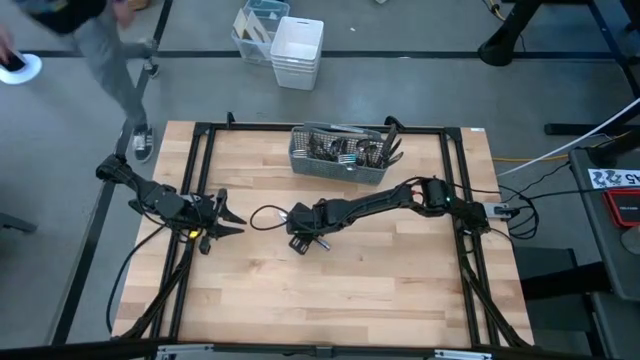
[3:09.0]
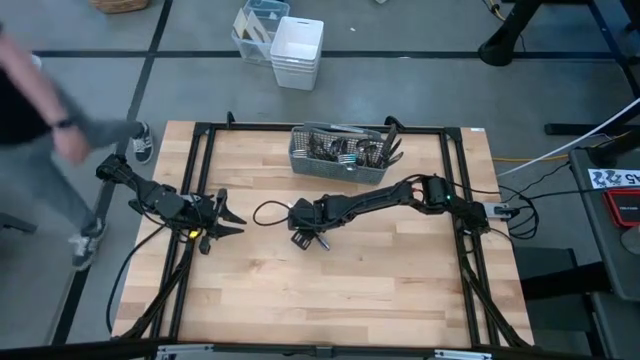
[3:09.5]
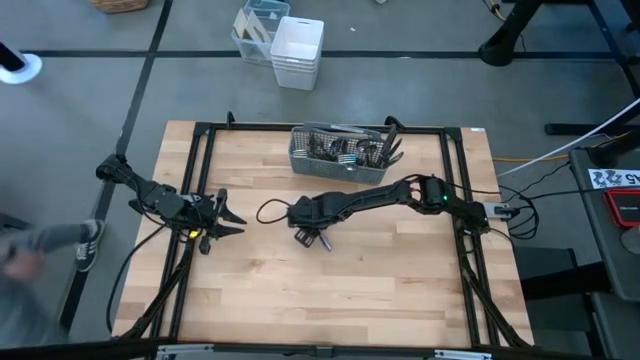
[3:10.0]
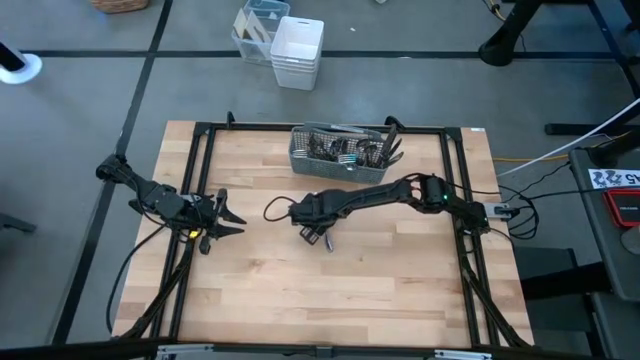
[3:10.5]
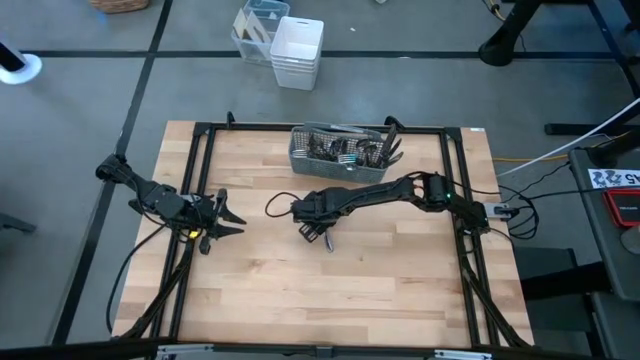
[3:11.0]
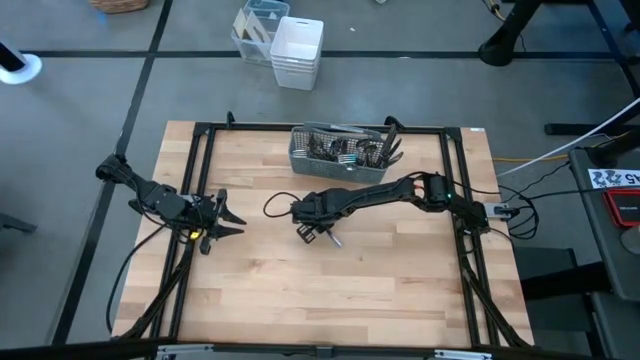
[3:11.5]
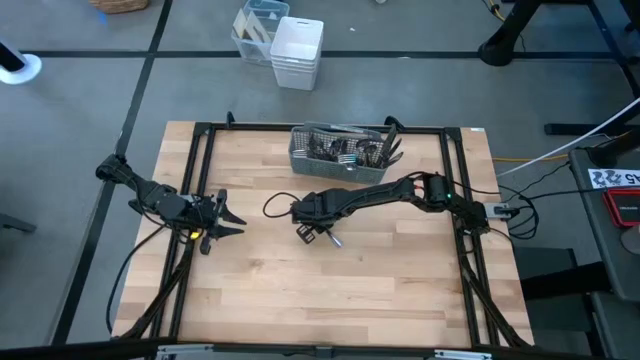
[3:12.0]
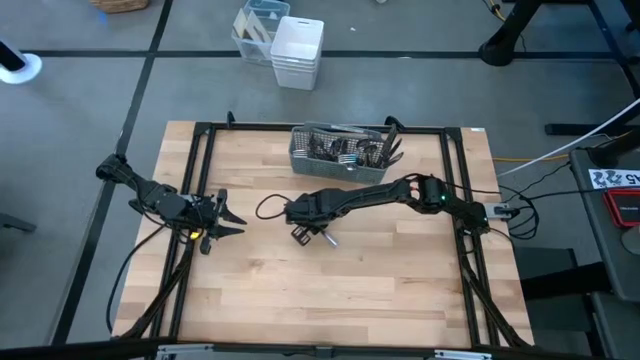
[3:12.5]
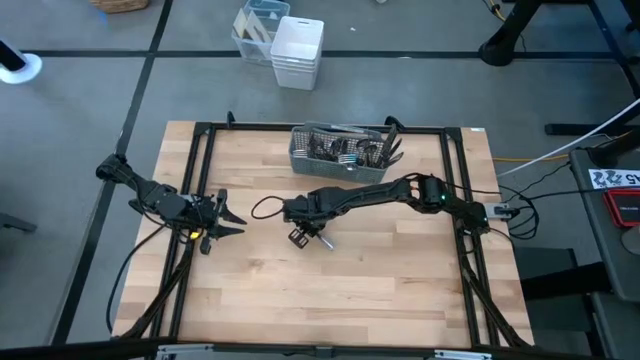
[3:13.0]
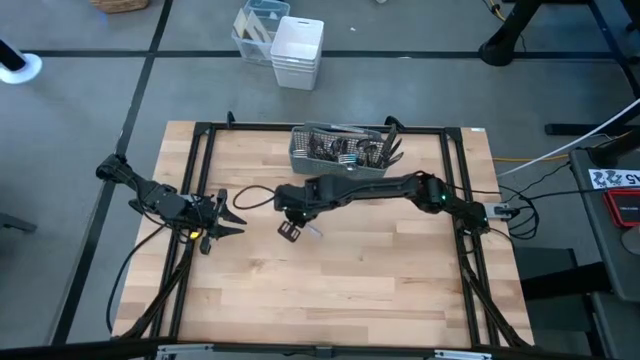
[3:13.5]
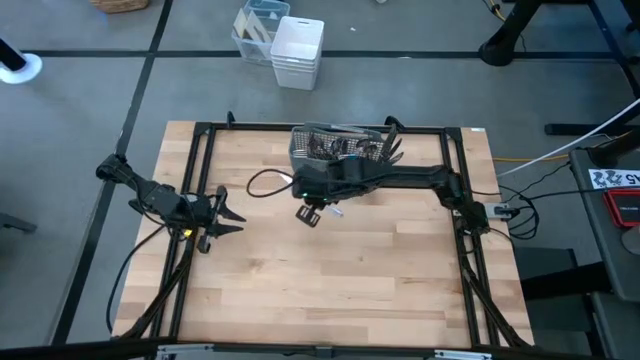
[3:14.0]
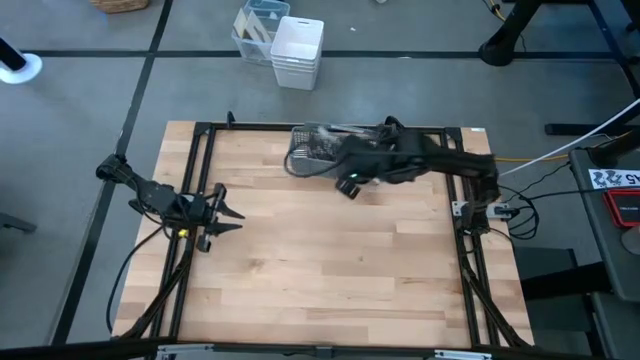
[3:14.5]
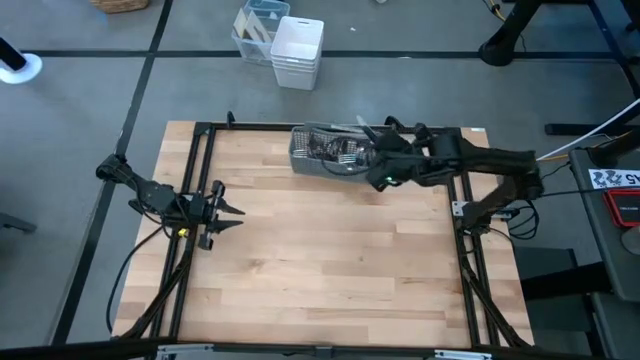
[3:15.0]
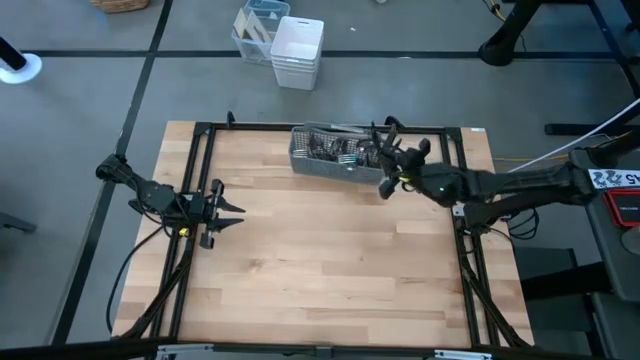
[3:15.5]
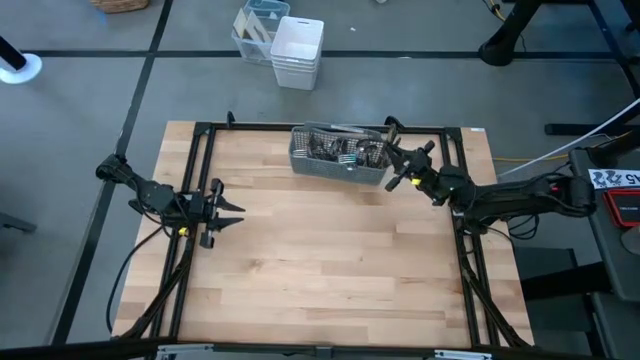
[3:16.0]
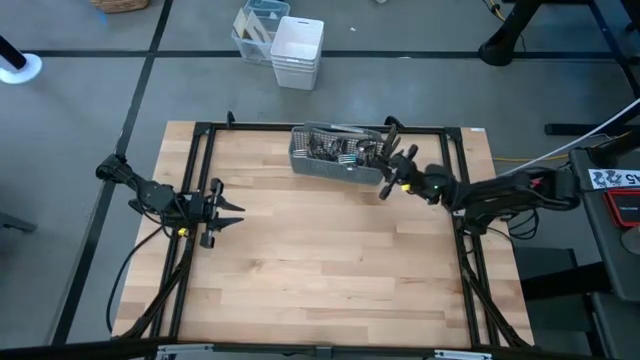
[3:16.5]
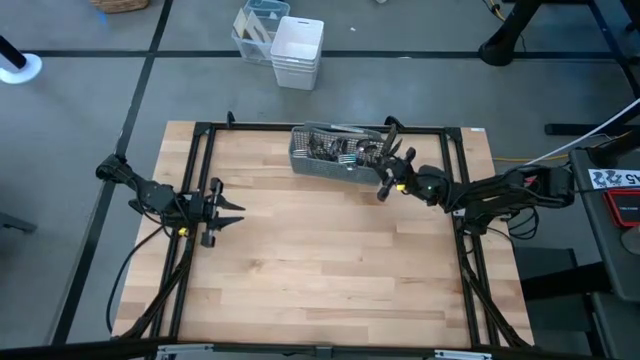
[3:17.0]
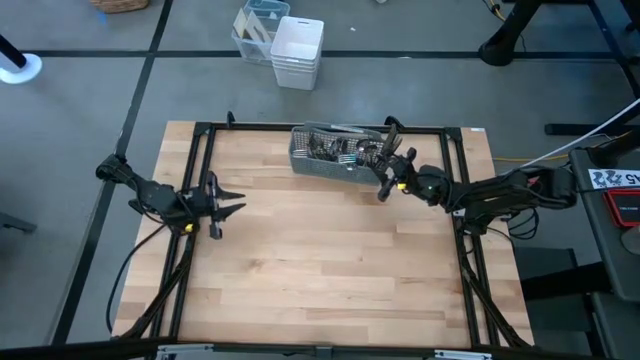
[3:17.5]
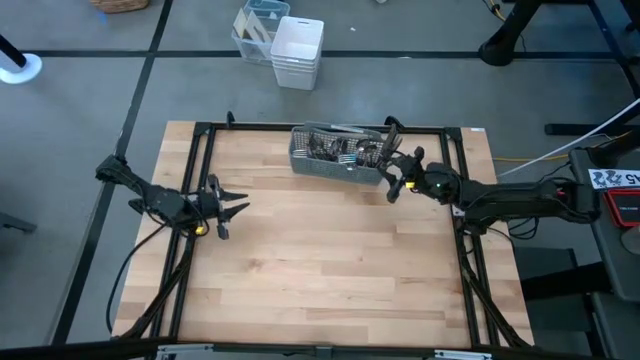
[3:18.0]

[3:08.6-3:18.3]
Task: Sort silverware
Put the knife into the silverware rack

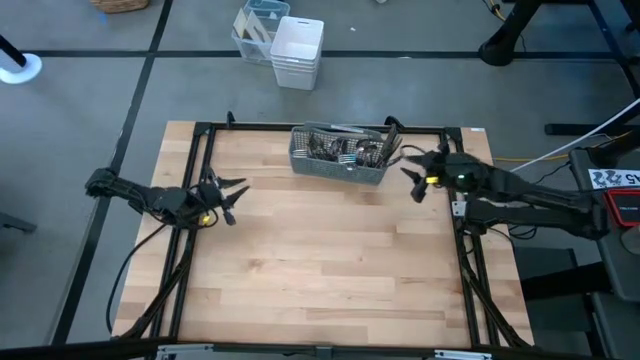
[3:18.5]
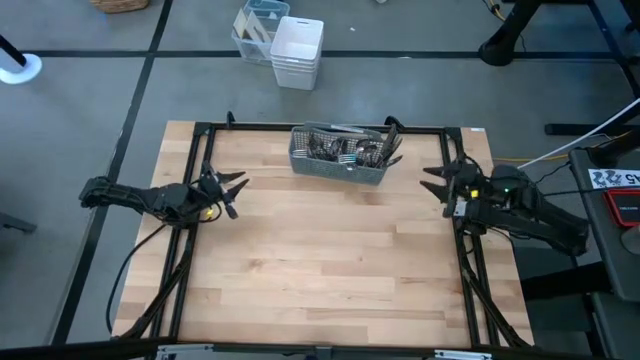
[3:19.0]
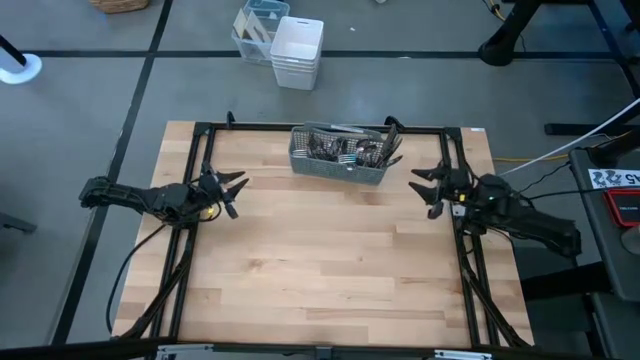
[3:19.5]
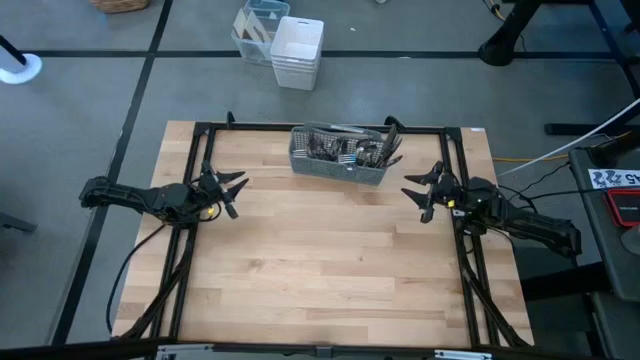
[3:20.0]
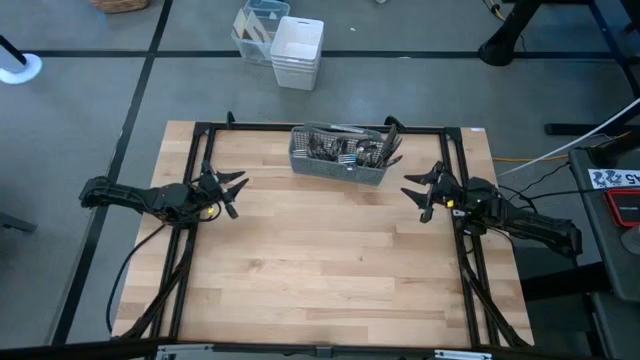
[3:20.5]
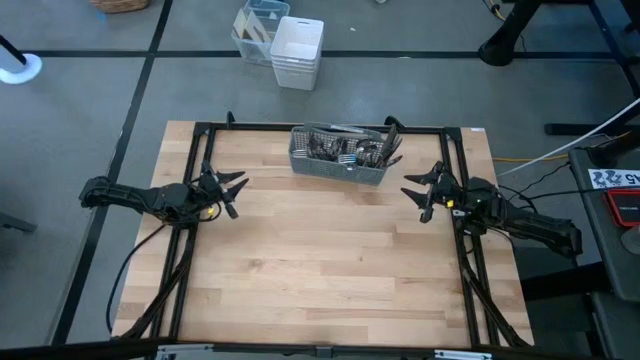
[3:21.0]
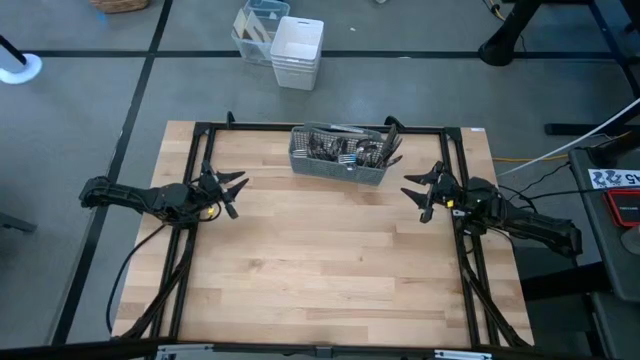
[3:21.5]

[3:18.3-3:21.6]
Return to Home Position

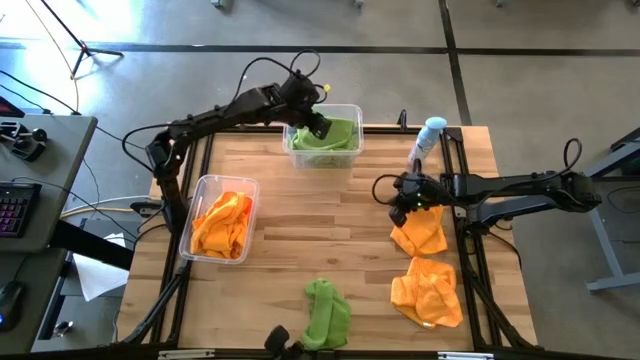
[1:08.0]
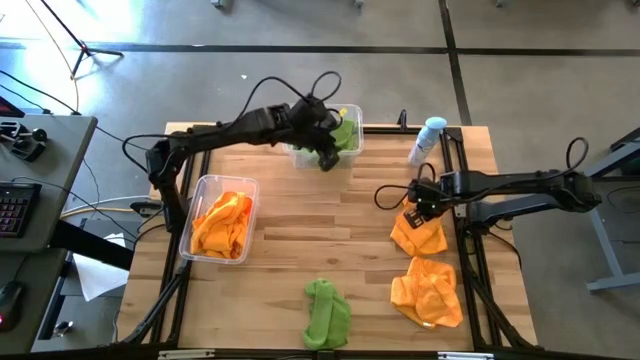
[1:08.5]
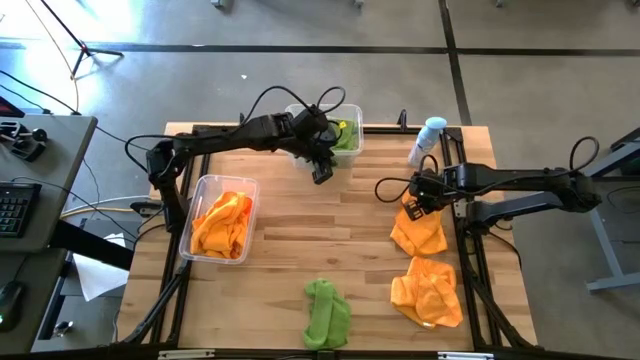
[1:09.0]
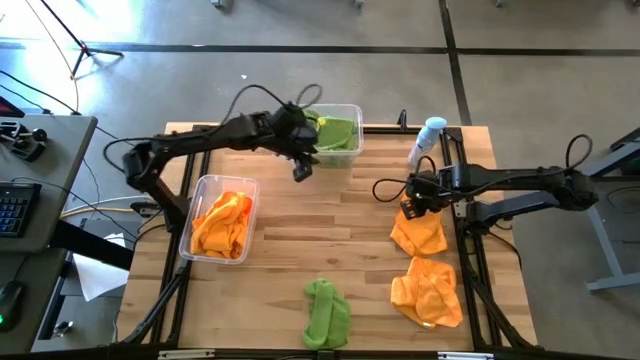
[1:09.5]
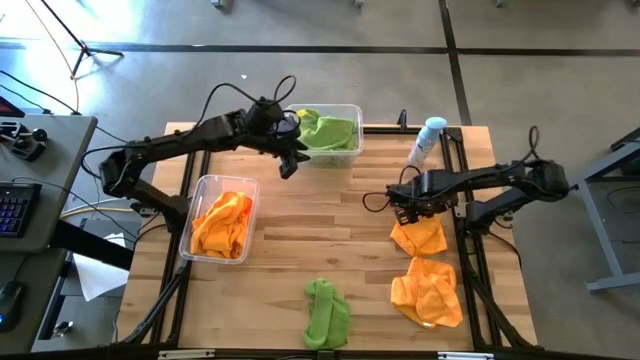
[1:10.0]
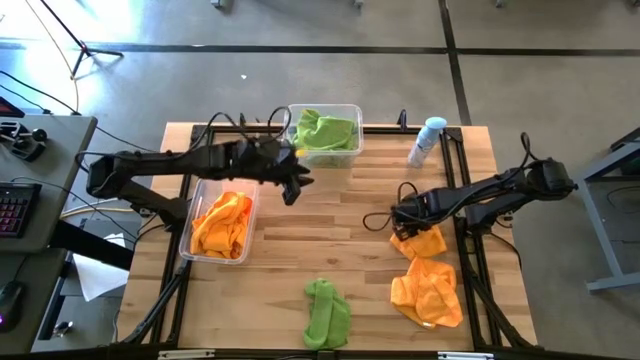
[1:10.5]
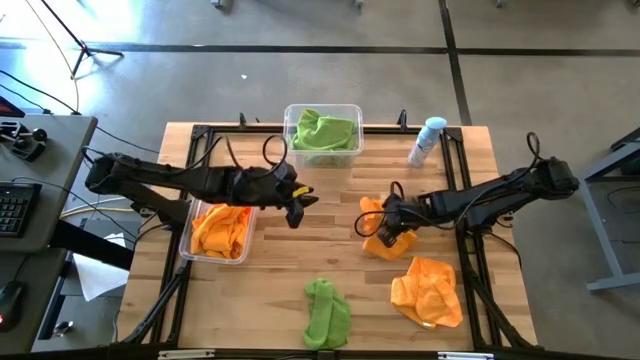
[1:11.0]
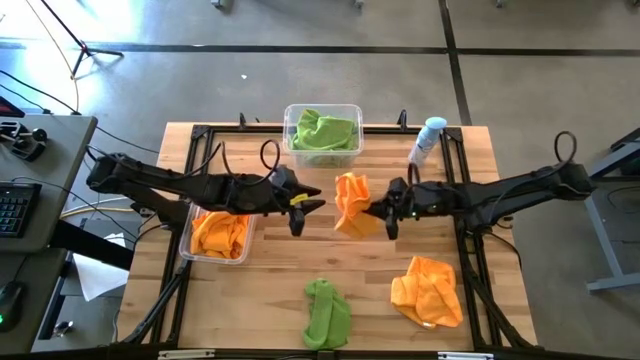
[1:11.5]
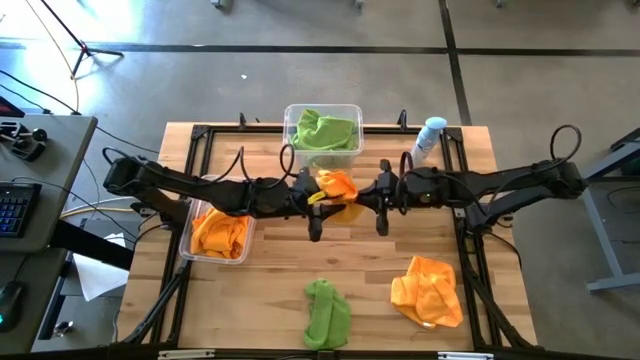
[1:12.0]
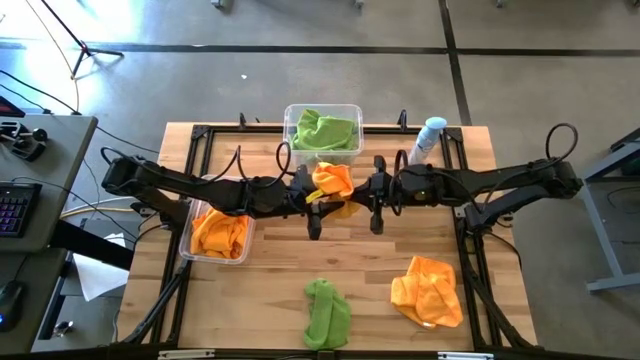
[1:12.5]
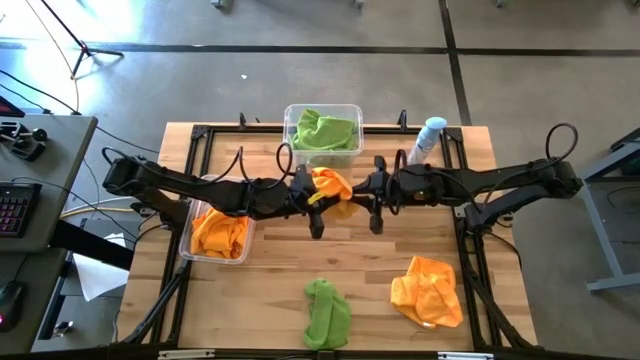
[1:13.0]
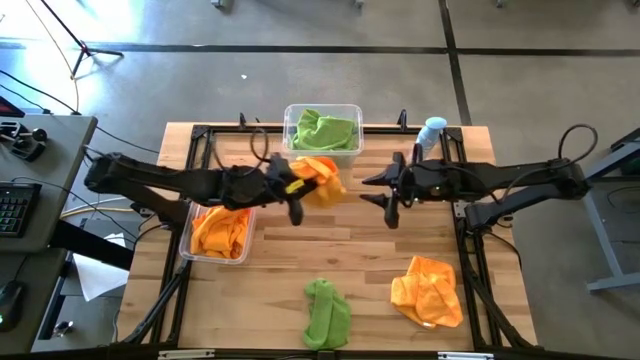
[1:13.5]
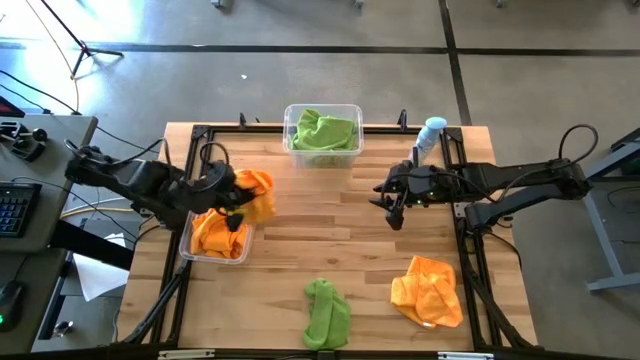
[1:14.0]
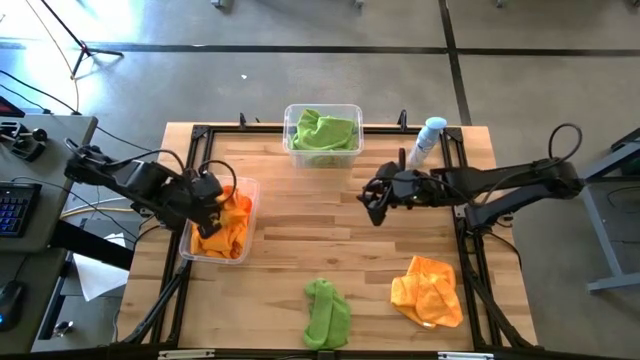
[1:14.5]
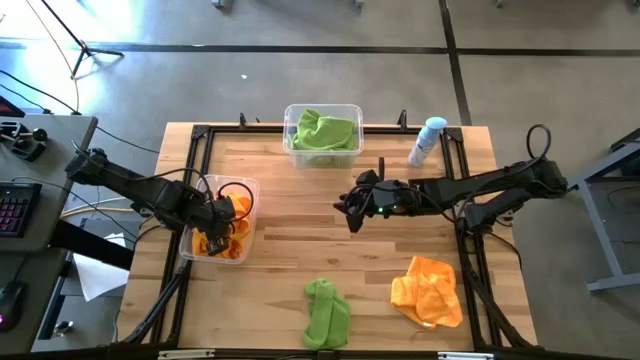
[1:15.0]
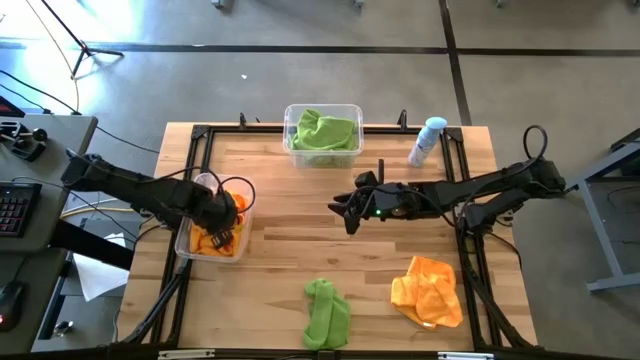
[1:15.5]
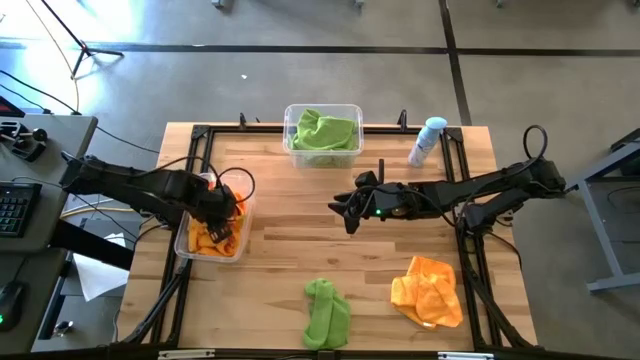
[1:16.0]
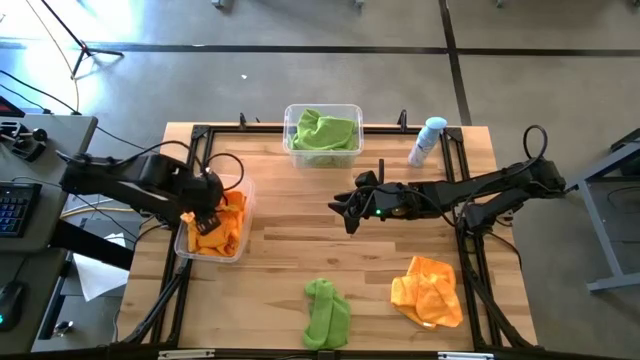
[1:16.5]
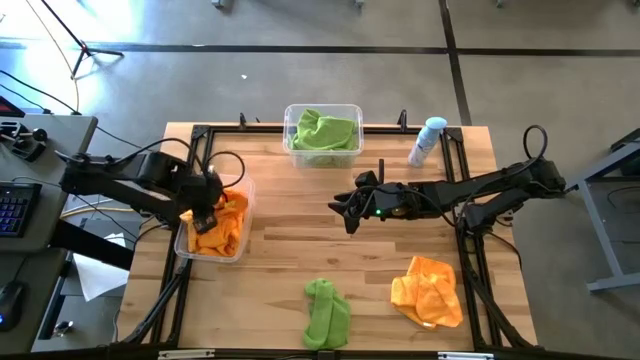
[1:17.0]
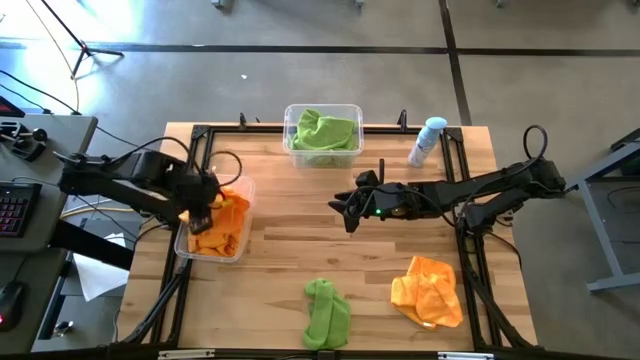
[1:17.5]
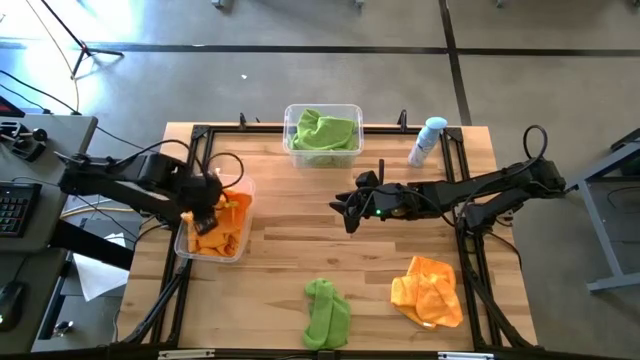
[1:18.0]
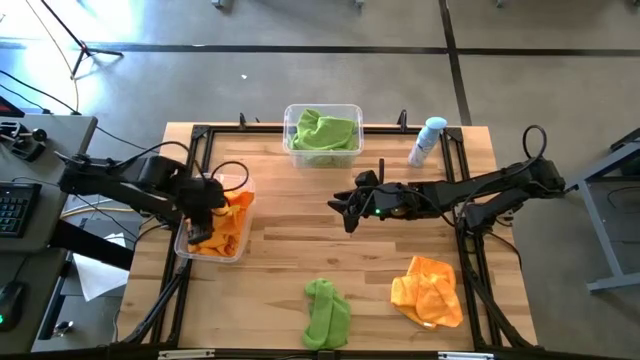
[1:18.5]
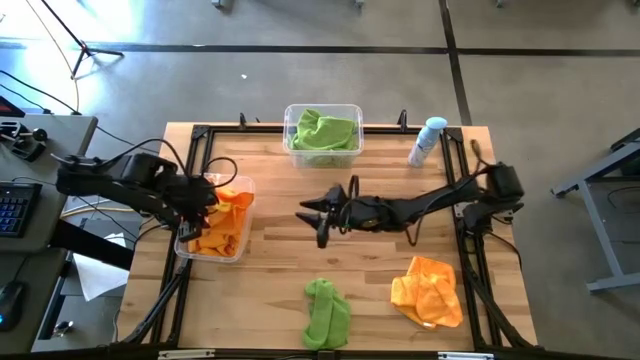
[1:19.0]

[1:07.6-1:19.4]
Task: Sort microfiber towel by color & place in baskets
Put the orange microfiber towel into bottom transparent bin
